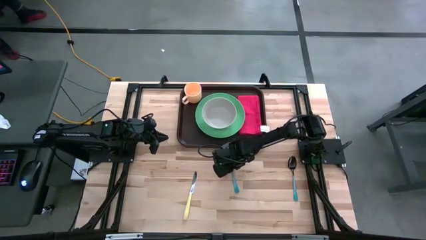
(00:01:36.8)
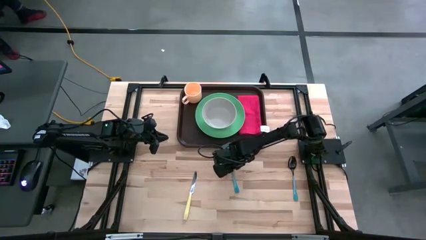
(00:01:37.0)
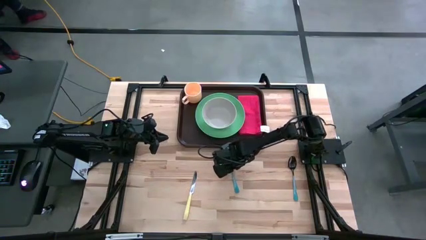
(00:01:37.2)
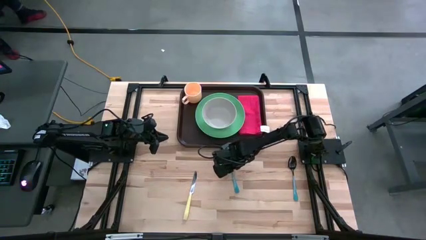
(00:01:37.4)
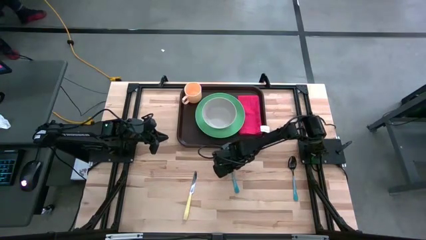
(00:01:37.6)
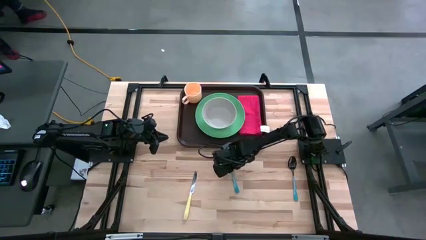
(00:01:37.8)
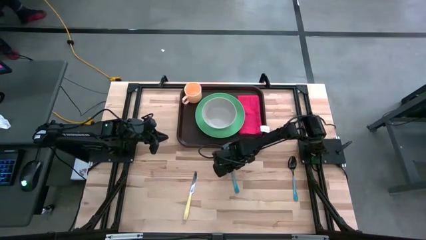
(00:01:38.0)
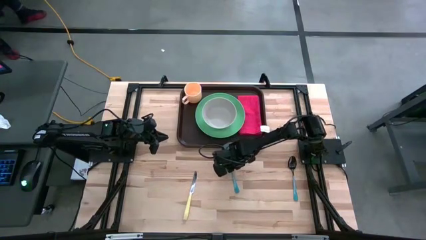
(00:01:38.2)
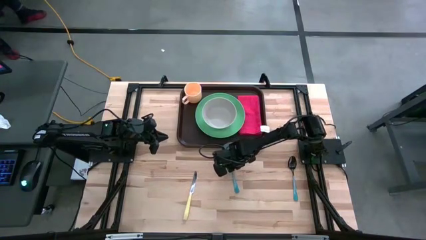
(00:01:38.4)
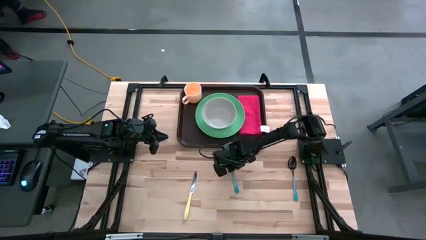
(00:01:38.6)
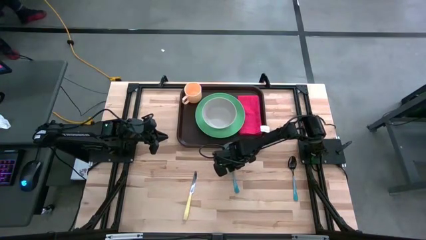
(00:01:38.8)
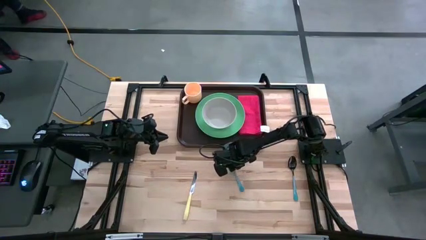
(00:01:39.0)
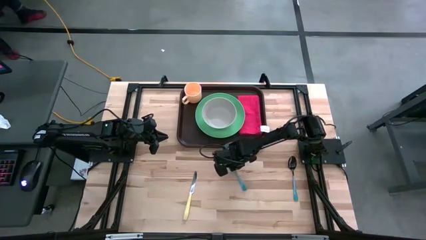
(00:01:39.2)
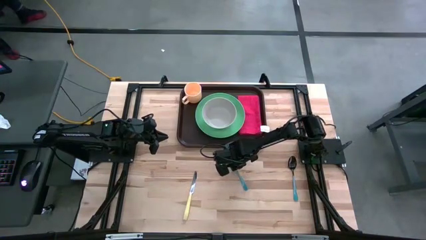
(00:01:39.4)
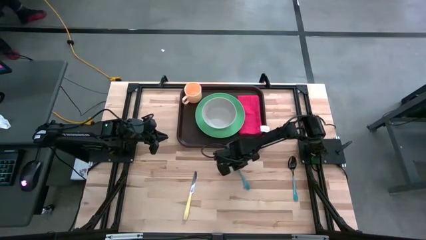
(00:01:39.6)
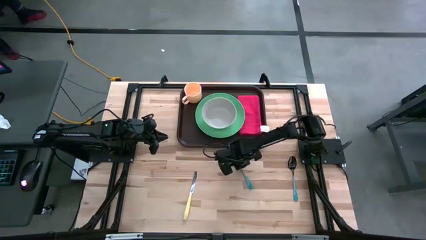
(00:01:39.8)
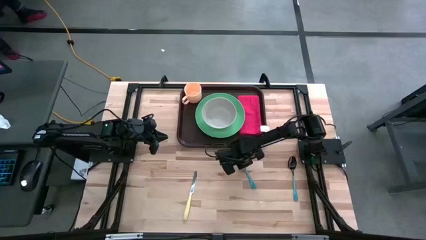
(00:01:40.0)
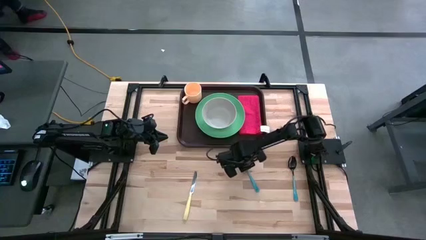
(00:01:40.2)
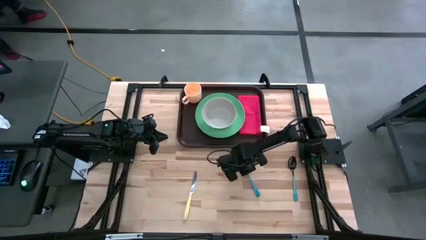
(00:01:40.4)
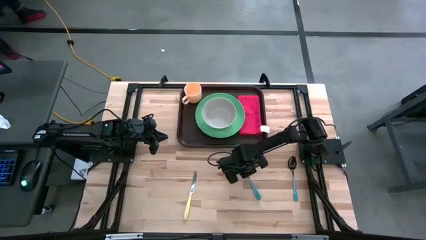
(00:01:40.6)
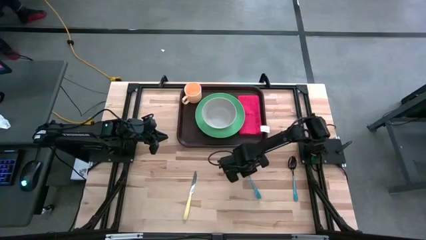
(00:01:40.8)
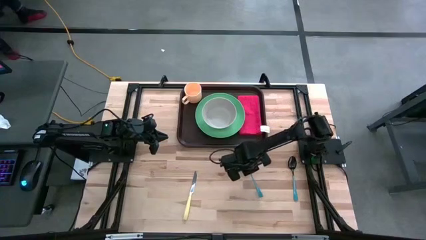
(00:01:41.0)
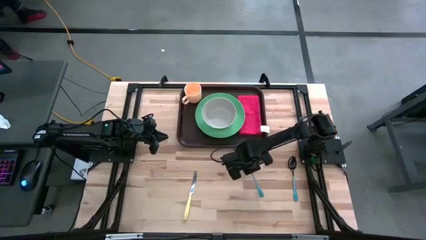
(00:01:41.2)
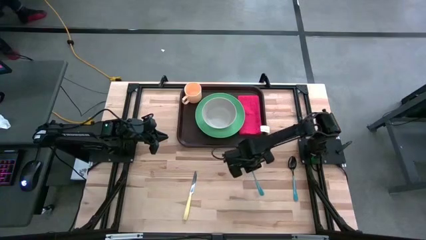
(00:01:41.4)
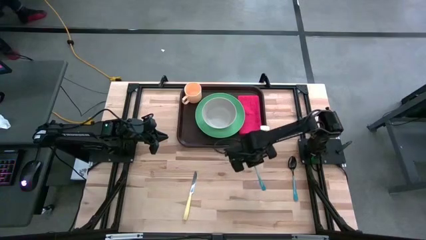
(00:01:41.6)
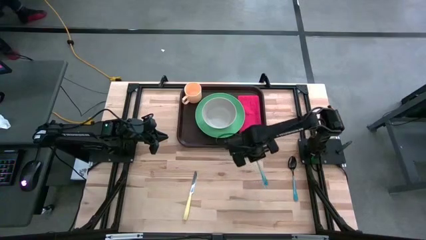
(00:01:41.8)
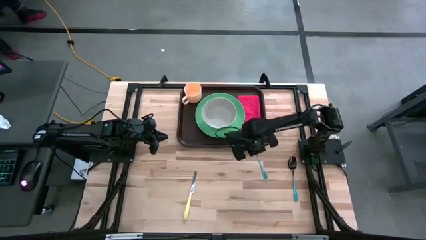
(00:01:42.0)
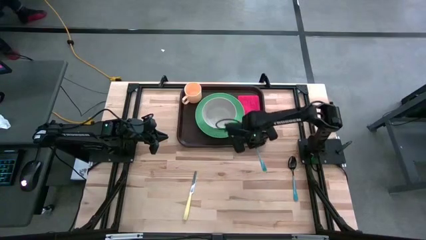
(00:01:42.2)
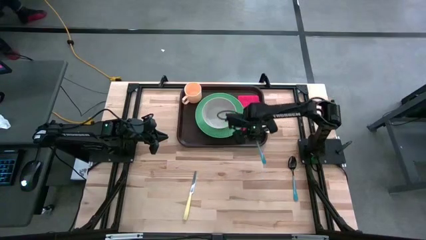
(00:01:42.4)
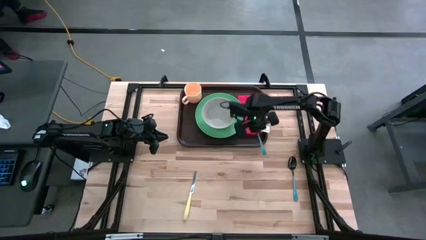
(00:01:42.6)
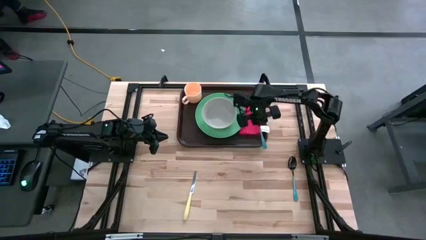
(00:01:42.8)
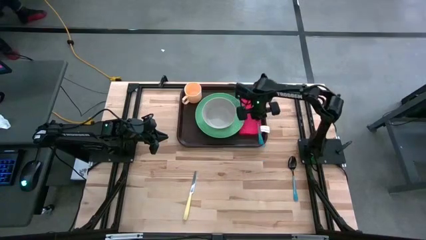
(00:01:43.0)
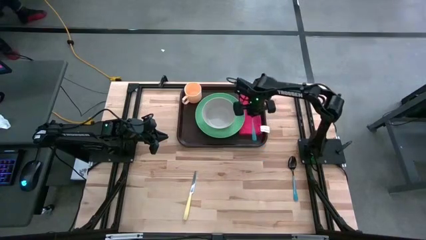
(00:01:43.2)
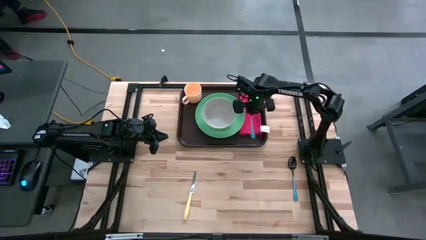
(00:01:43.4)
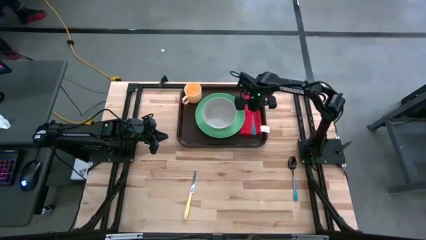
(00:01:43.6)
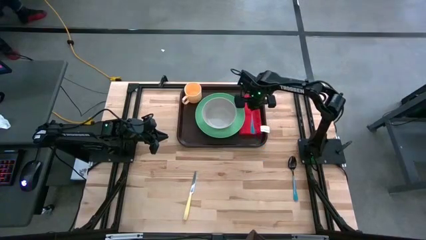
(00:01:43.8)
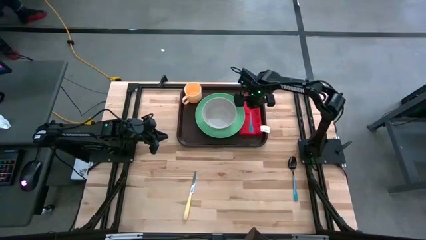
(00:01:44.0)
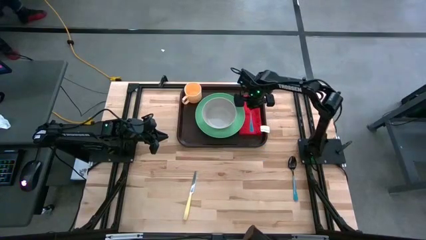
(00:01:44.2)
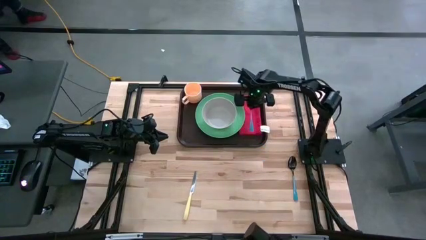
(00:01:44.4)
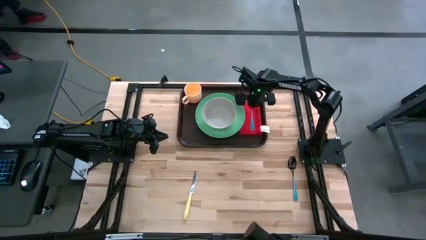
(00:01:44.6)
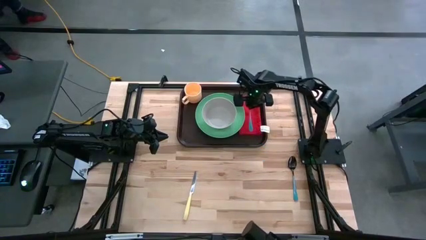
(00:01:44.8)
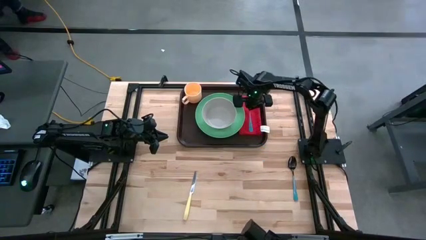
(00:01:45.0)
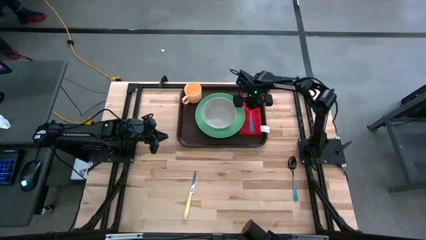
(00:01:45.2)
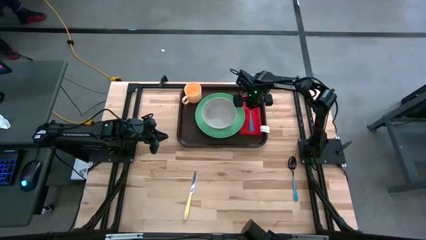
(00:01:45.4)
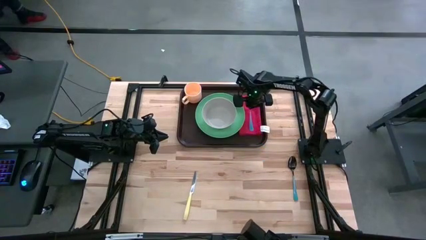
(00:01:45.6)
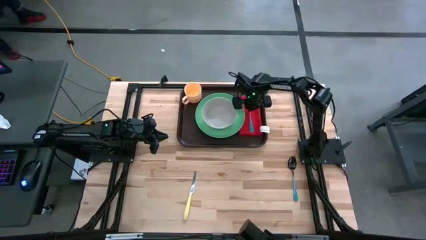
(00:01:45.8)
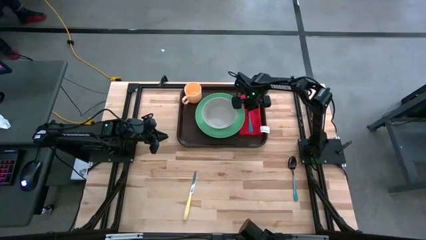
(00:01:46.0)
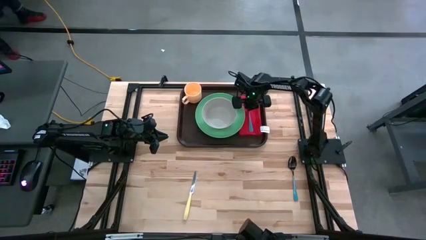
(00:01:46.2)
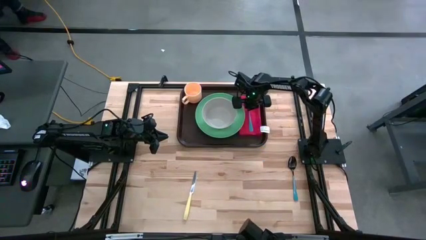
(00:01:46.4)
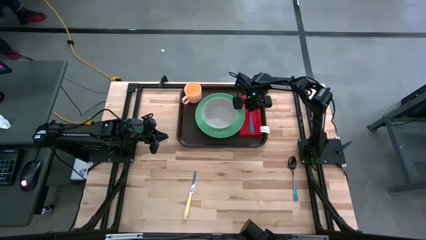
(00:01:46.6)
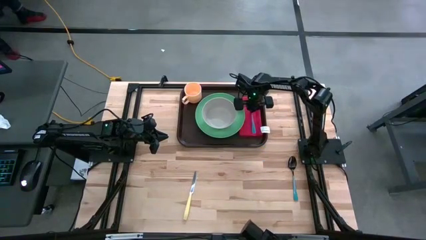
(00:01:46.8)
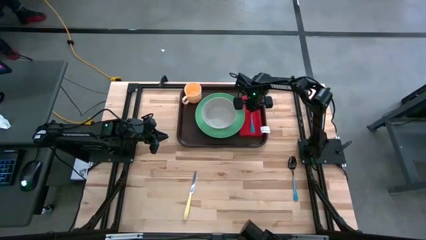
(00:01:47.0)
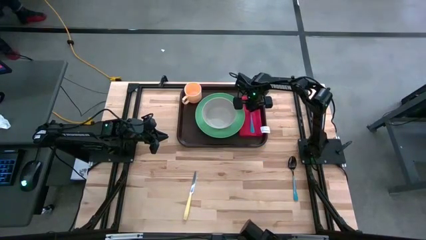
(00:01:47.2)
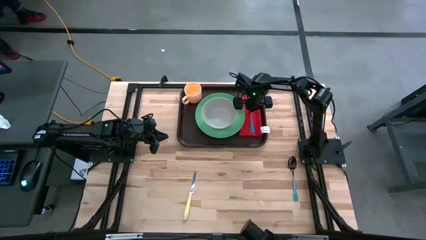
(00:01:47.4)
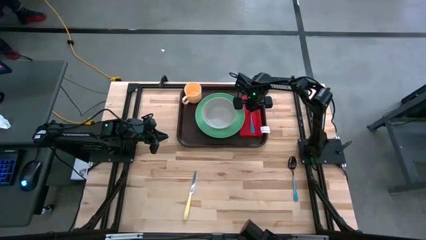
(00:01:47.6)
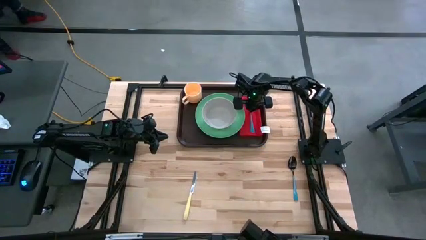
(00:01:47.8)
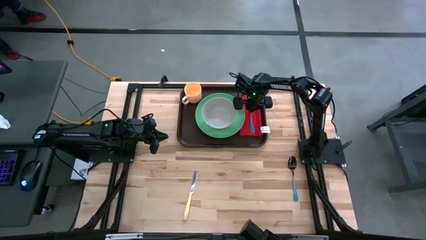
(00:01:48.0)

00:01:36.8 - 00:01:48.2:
Task: Set up tray
Put the blue fork on top of the red napkin
